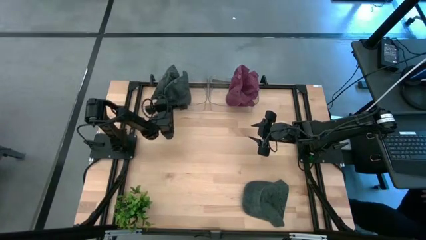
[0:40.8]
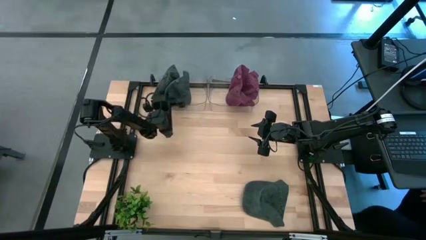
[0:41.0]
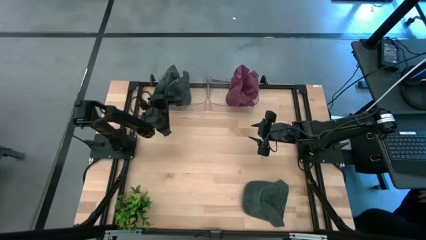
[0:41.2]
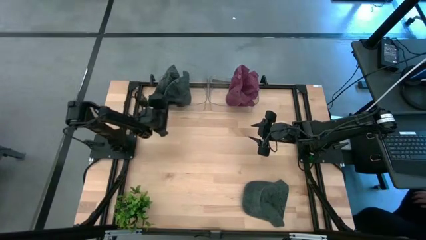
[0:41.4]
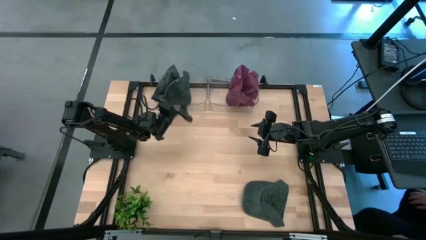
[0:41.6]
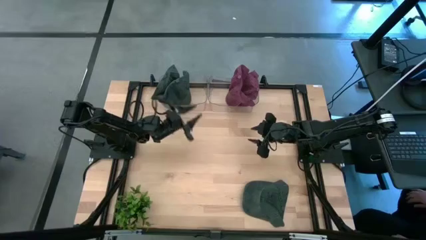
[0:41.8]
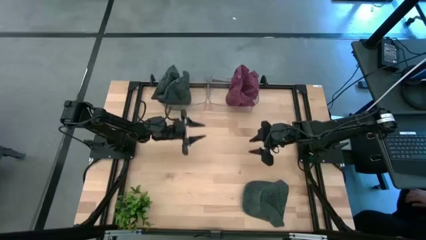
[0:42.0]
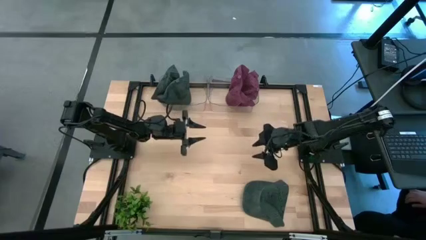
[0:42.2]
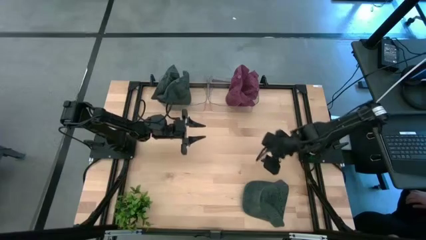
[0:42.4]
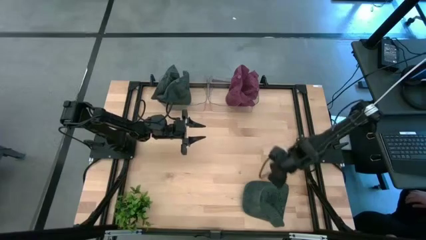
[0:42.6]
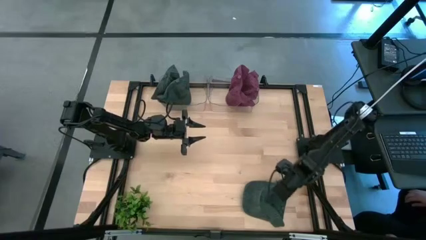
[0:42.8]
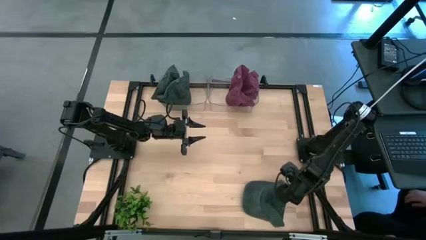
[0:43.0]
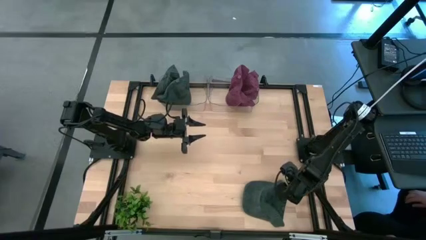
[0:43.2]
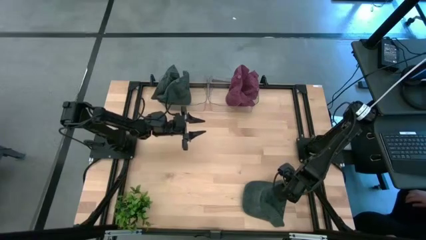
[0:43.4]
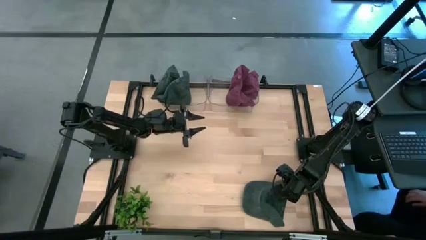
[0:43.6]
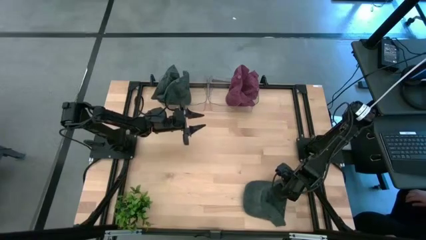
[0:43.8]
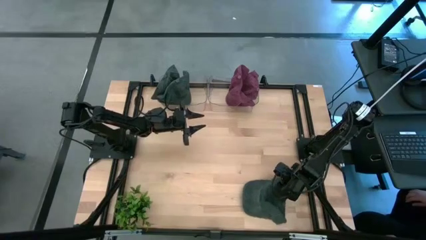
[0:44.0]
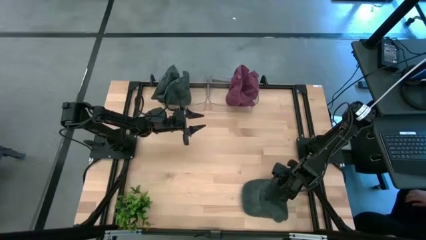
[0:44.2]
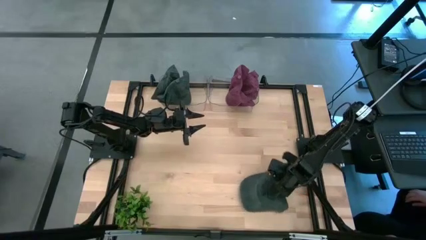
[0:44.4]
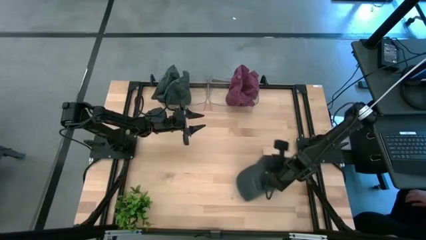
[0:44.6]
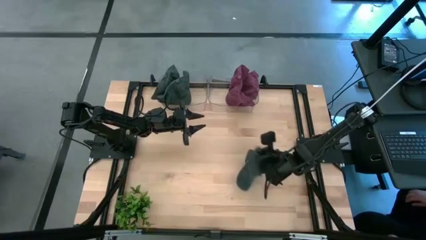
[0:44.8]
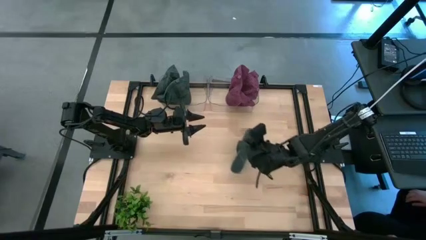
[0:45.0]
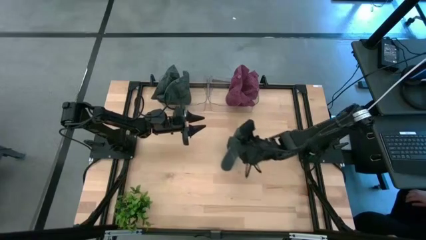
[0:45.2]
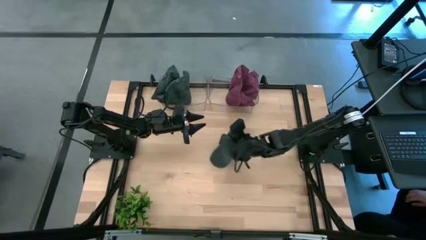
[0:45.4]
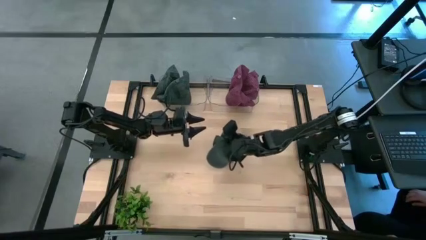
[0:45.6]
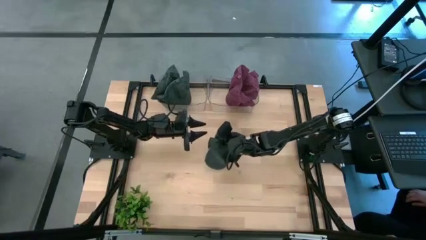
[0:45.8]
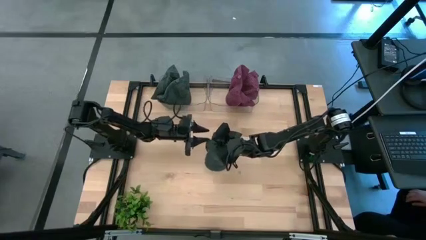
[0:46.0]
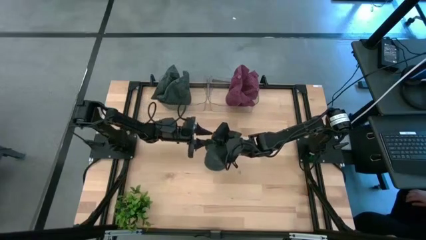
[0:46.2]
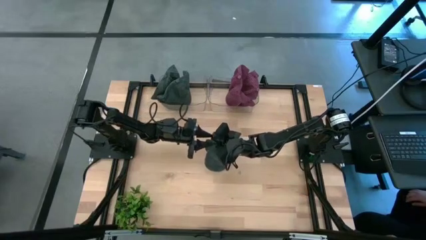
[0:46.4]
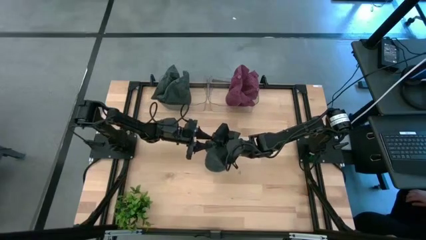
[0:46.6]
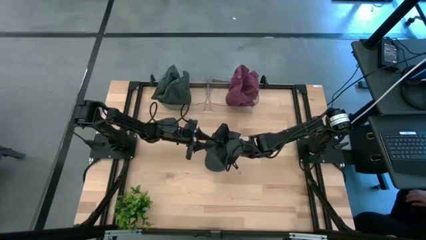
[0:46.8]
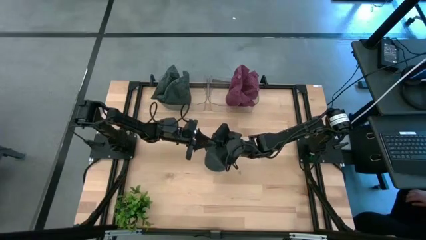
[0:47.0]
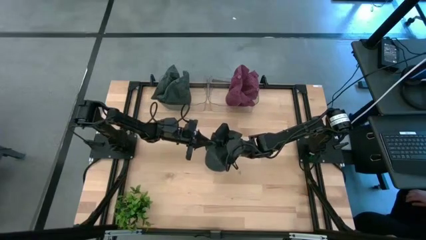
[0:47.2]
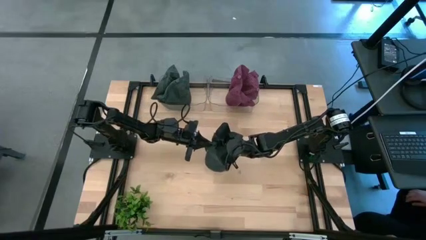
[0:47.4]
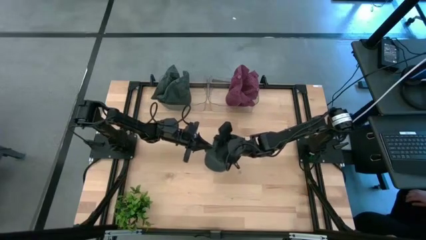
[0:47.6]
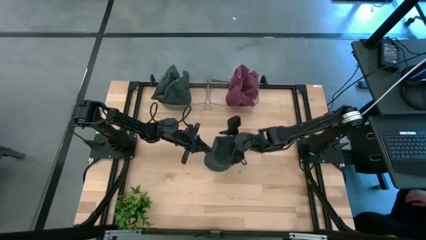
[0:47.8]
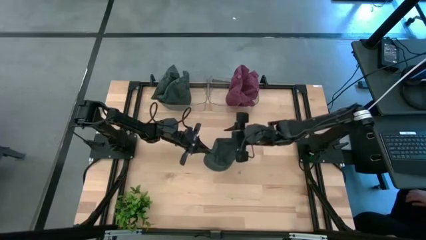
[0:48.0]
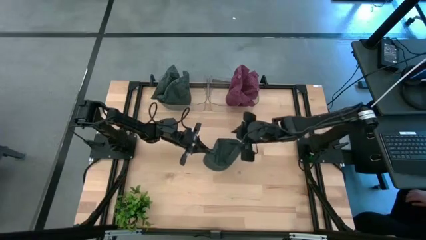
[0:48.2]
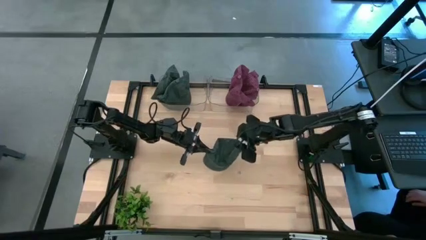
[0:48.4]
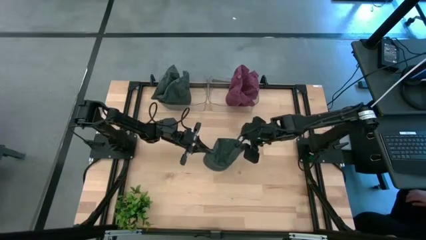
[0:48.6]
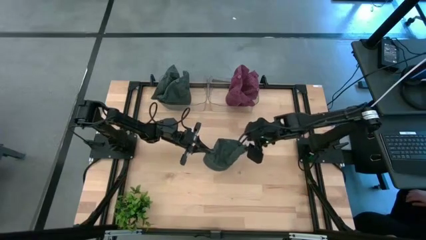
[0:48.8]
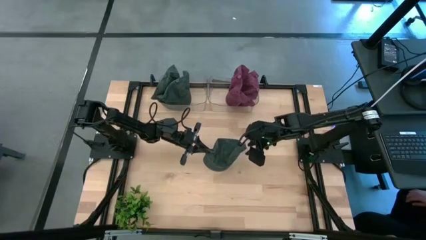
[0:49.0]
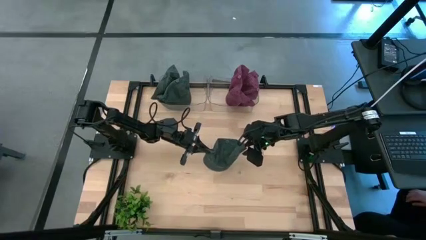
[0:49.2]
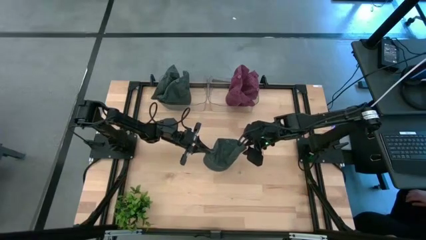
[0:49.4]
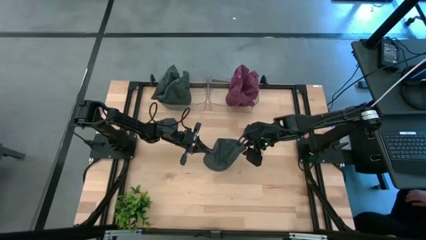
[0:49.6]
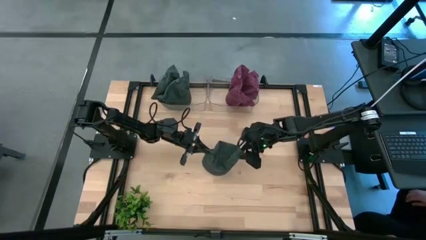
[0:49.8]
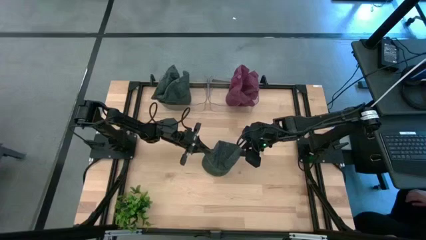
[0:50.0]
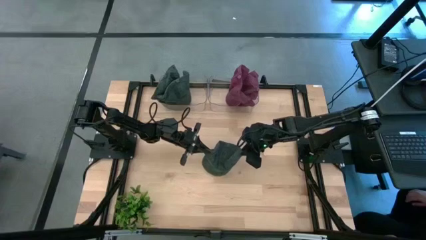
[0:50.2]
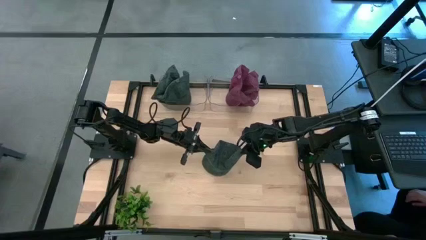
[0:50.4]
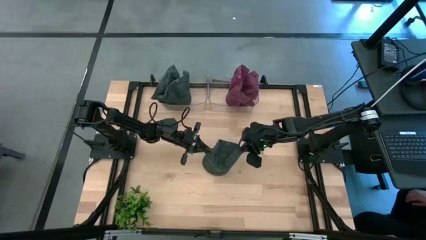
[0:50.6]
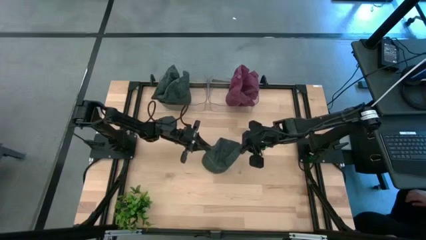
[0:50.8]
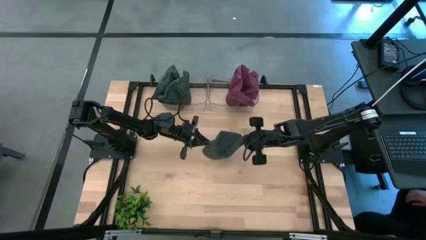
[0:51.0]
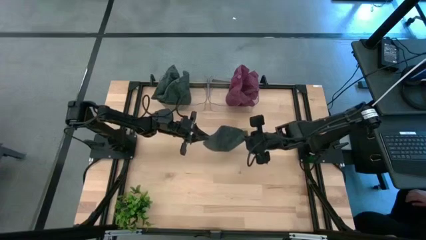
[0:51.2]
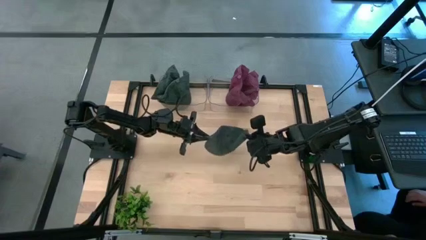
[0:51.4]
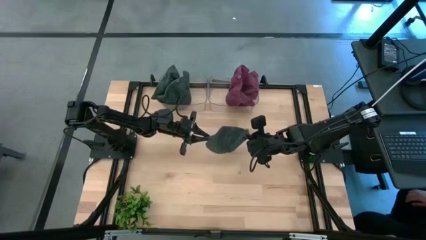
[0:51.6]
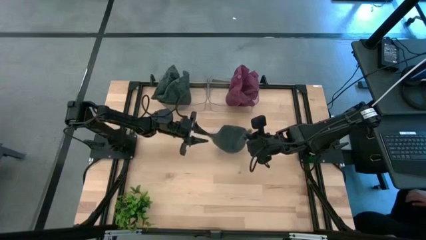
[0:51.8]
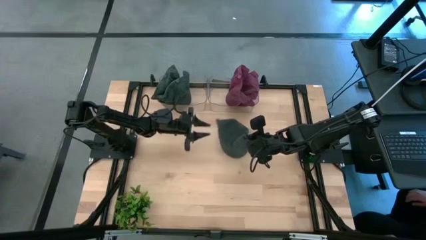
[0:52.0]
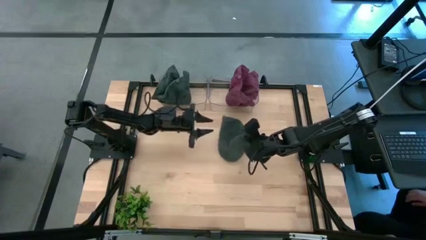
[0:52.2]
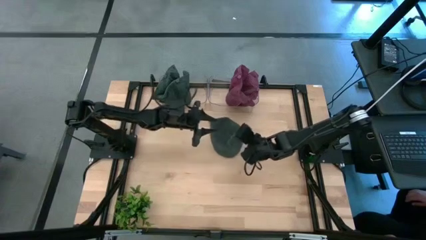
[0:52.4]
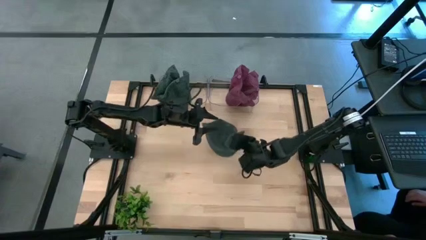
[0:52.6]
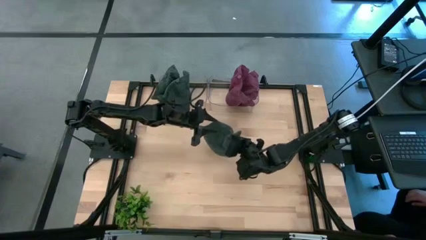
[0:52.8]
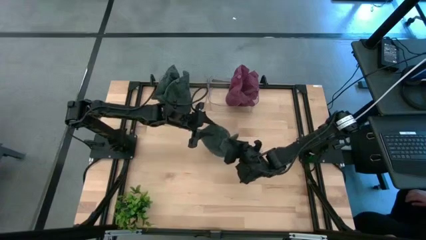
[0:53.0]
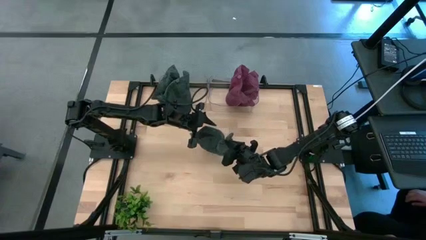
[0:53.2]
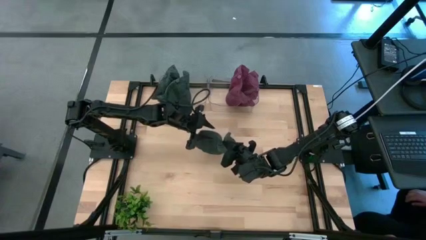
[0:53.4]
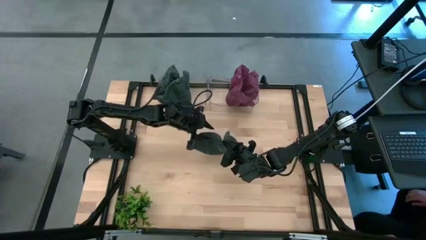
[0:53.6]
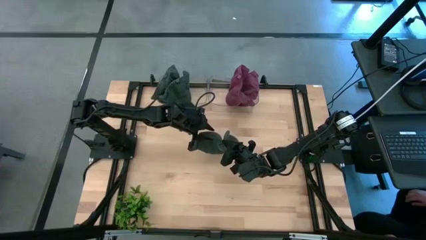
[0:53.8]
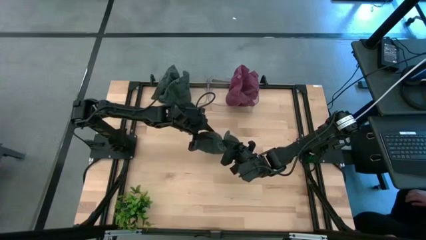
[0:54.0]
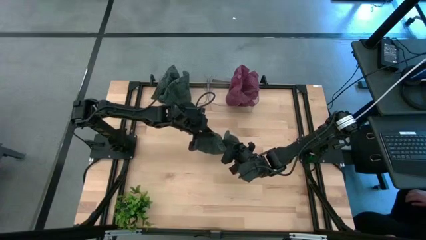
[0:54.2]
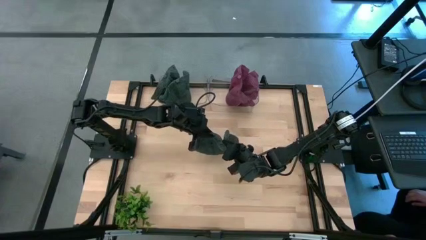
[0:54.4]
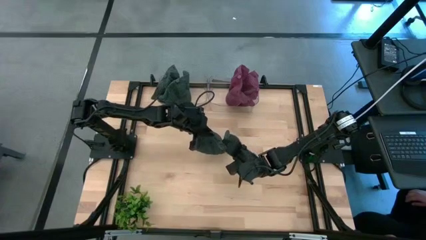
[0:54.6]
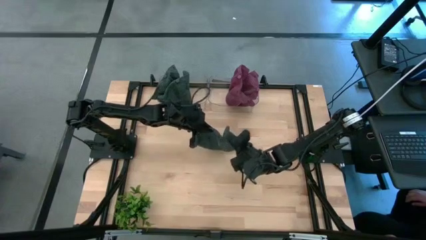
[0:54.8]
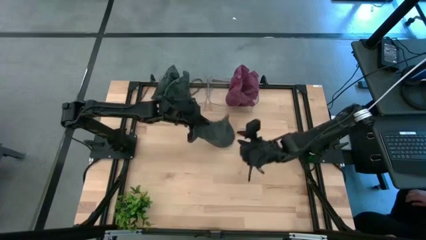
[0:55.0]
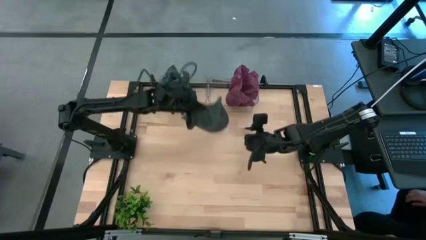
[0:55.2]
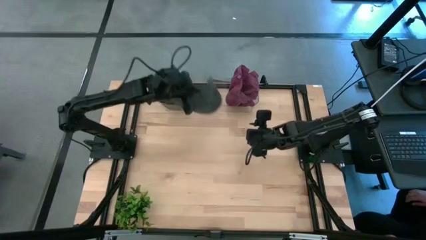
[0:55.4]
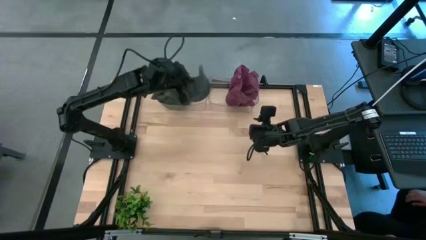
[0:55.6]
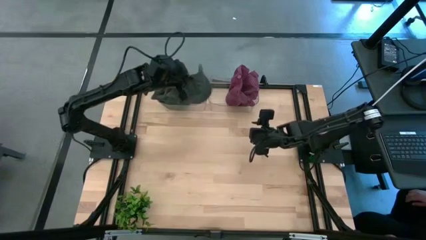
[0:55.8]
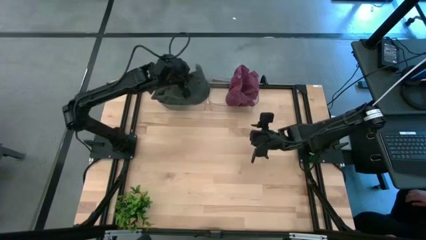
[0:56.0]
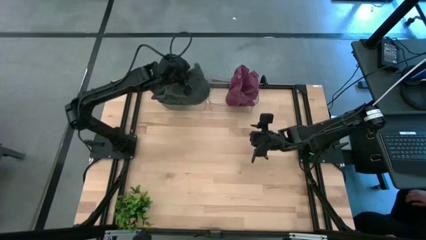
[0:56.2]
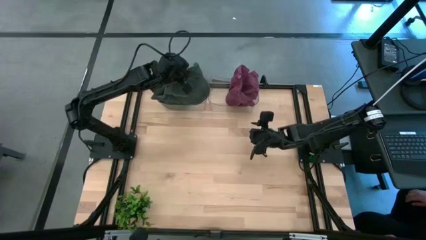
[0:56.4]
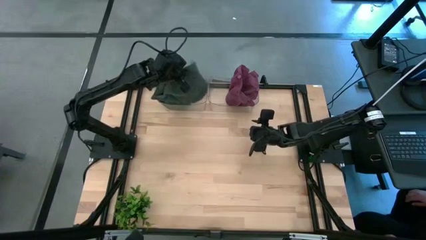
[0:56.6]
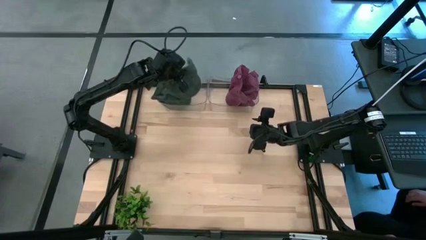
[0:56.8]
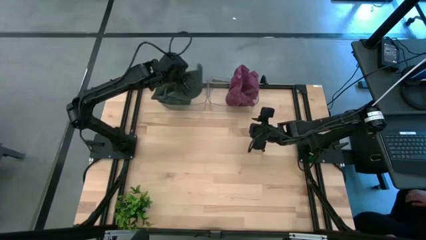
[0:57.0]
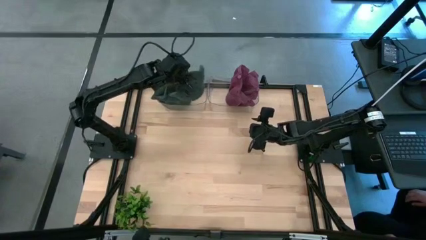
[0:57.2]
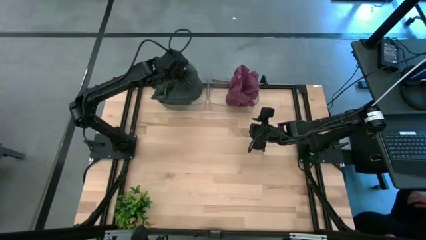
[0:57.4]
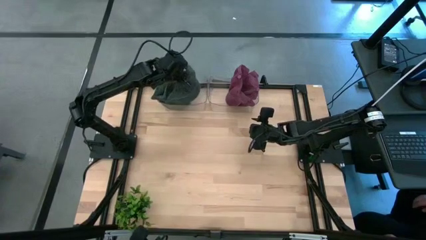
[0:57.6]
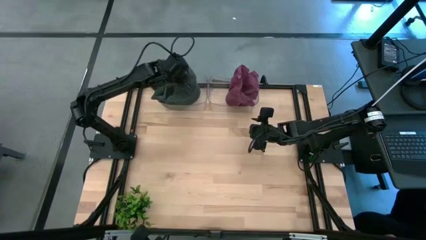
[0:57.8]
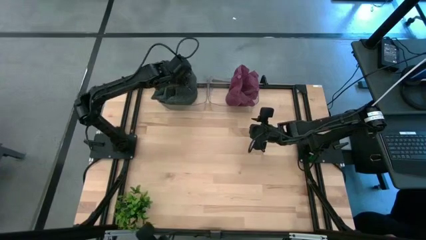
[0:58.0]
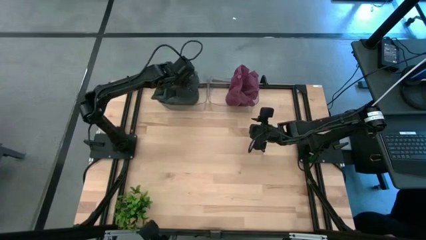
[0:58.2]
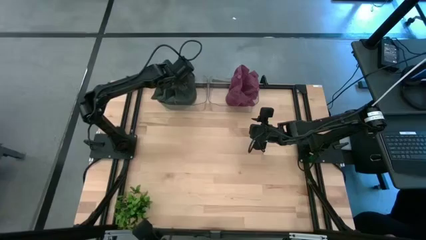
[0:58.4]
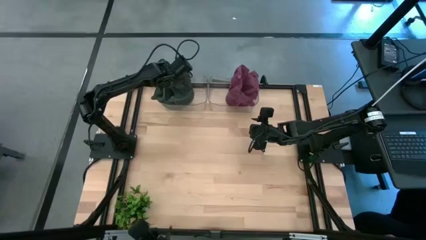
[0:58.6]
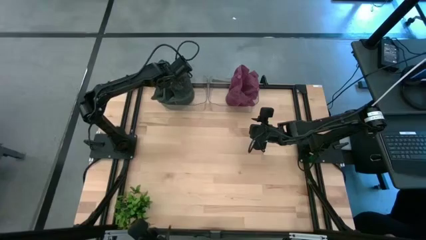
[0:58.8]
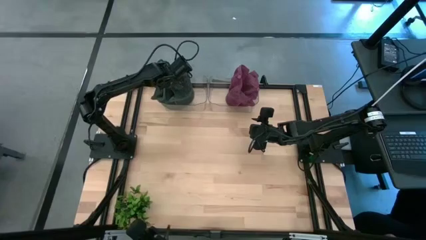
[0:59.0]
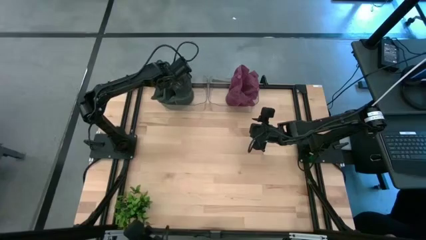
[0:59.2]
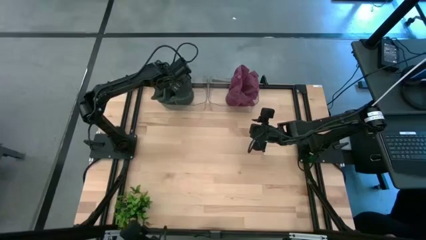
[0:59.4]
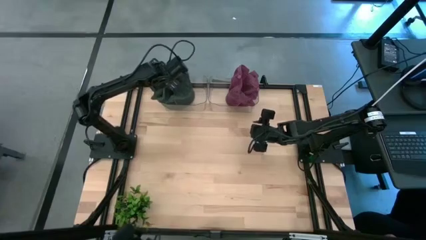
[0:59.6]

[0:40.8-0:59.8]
Task: Pick & Place hat
Put the black cap into the left transparent bin
